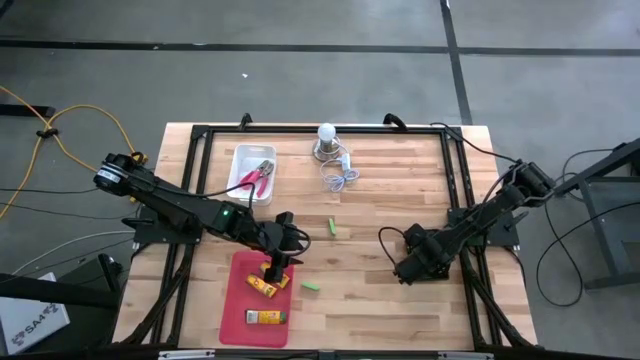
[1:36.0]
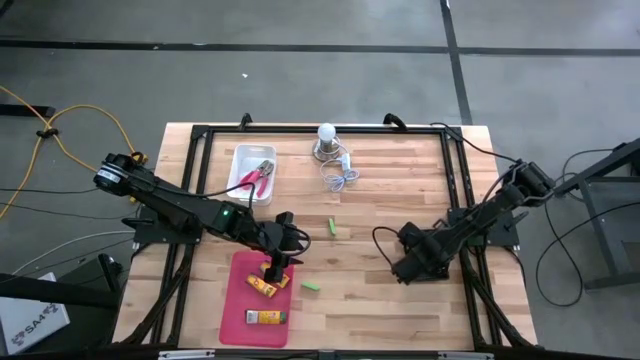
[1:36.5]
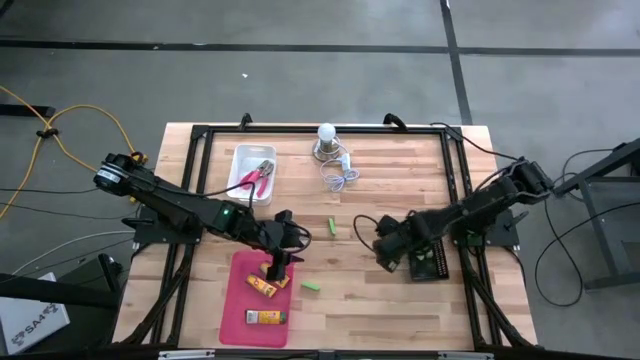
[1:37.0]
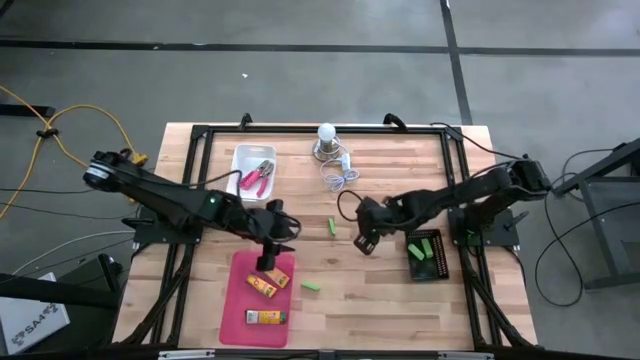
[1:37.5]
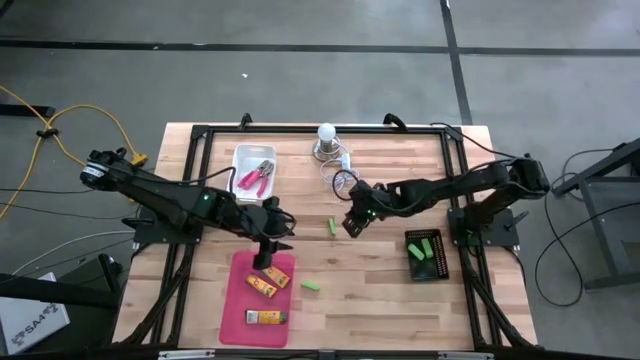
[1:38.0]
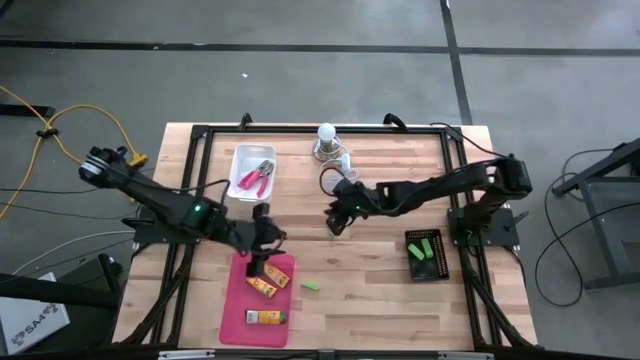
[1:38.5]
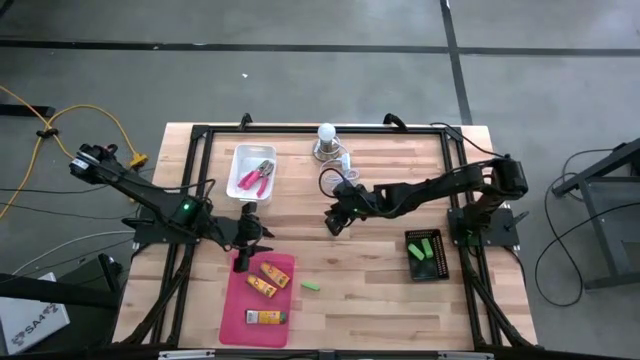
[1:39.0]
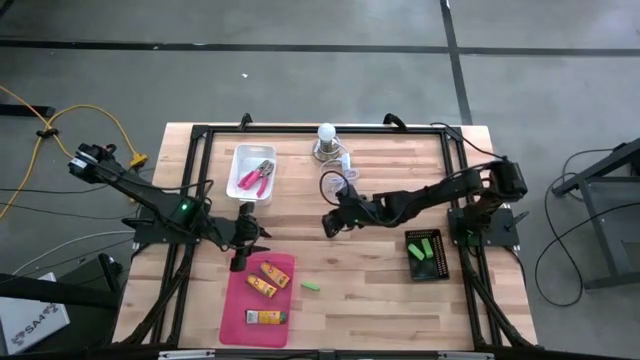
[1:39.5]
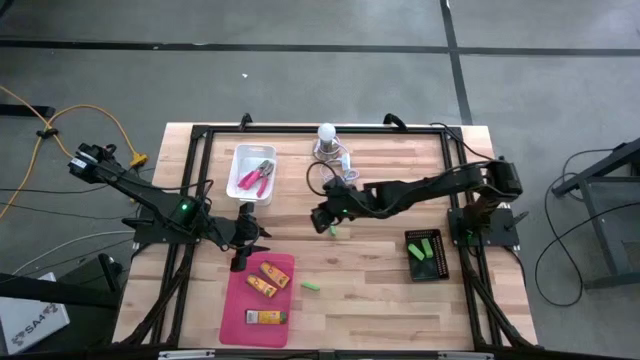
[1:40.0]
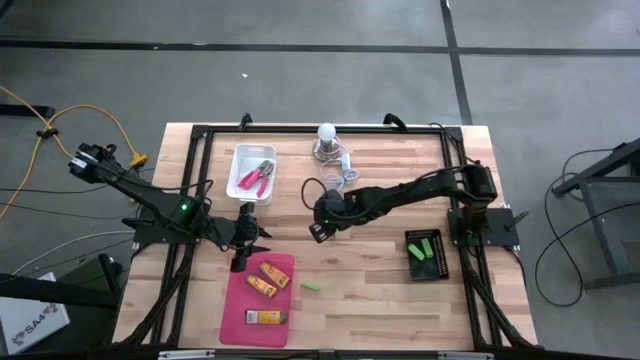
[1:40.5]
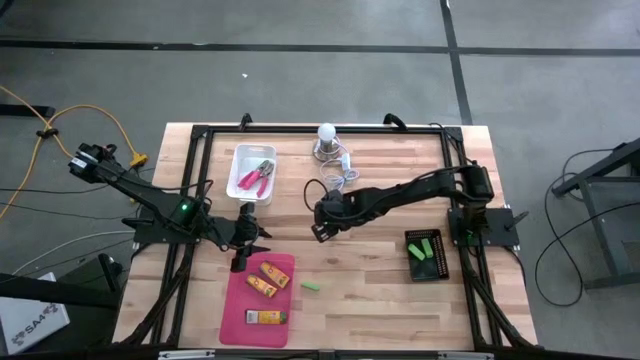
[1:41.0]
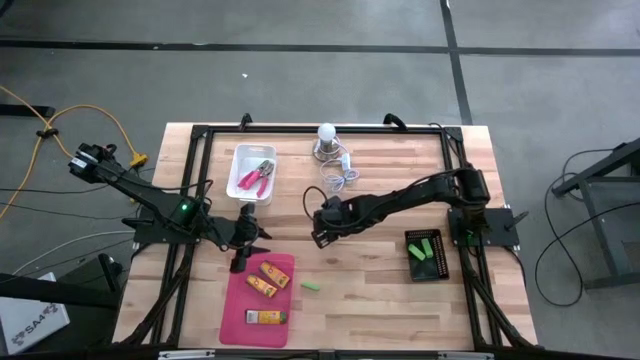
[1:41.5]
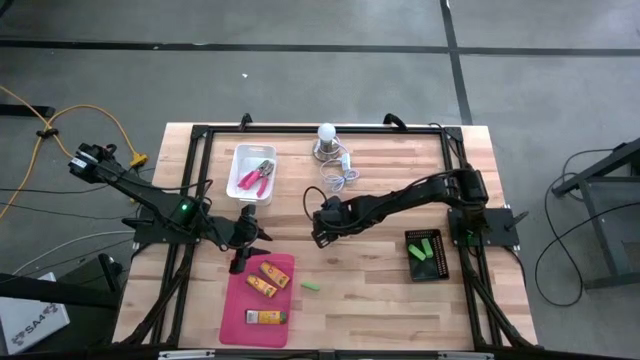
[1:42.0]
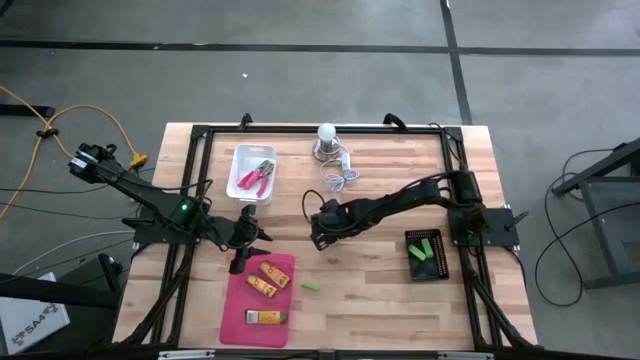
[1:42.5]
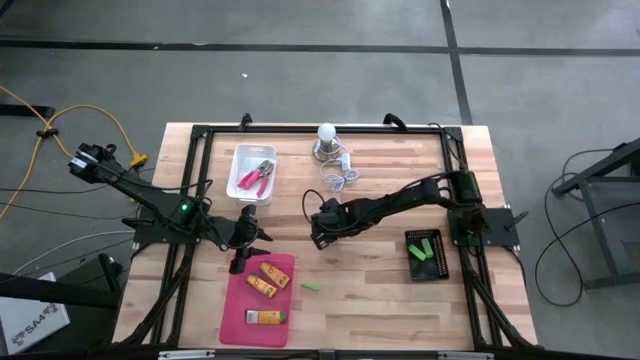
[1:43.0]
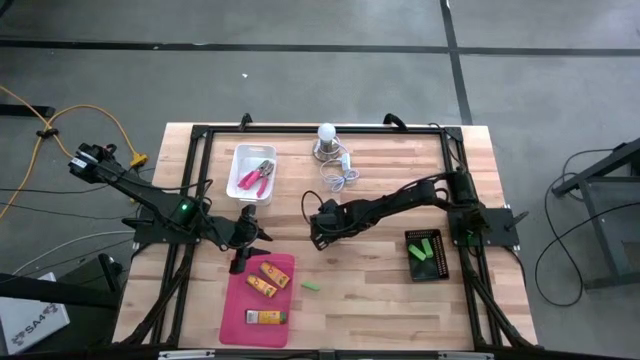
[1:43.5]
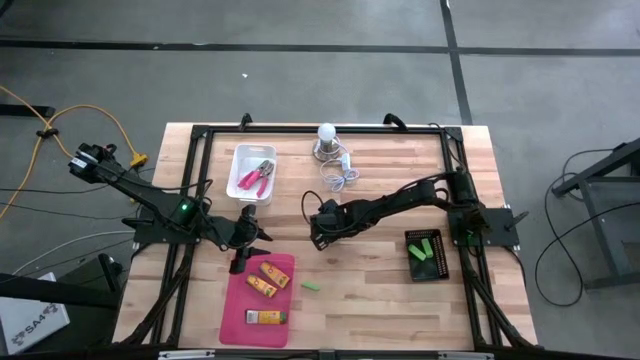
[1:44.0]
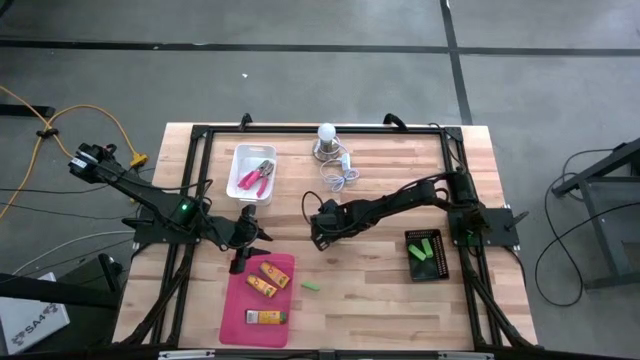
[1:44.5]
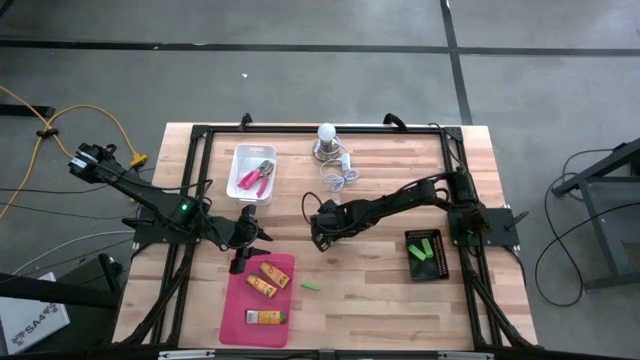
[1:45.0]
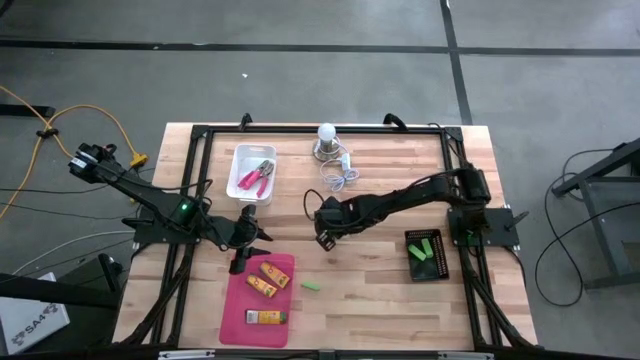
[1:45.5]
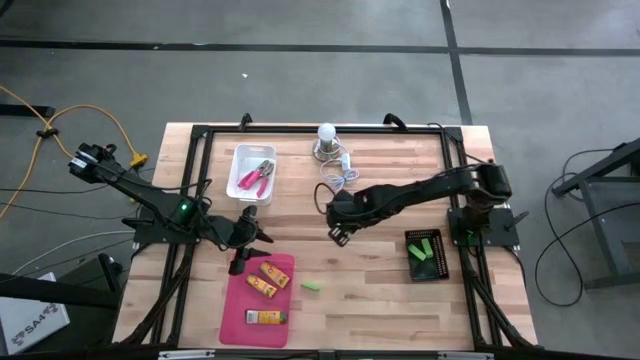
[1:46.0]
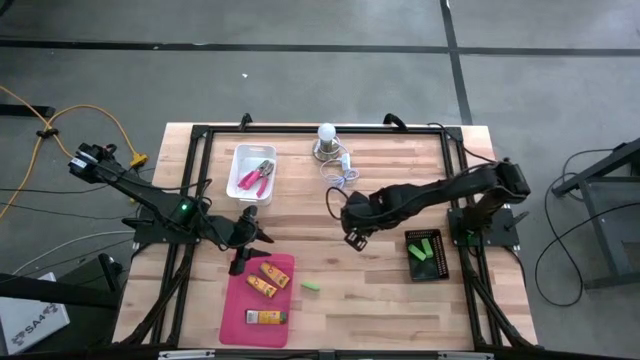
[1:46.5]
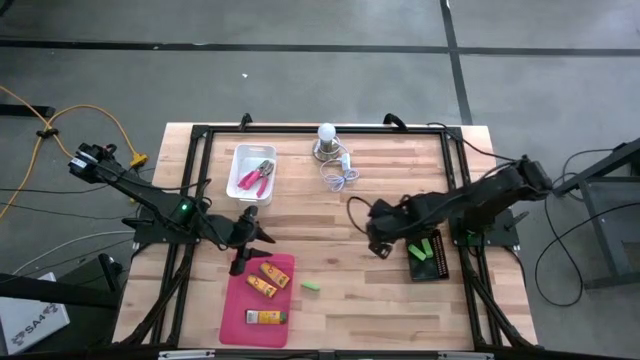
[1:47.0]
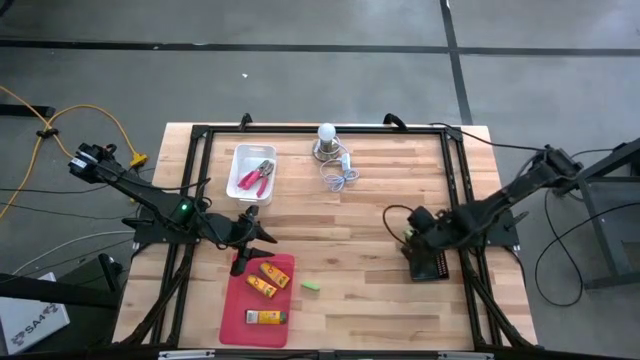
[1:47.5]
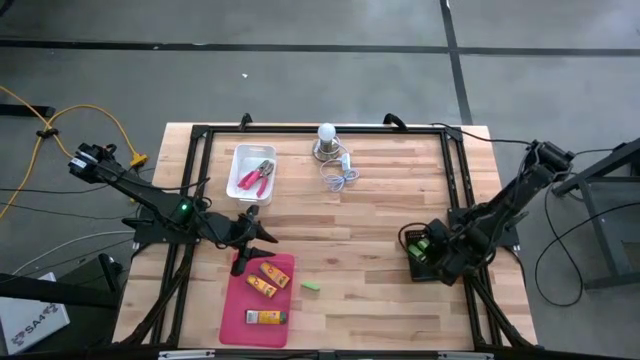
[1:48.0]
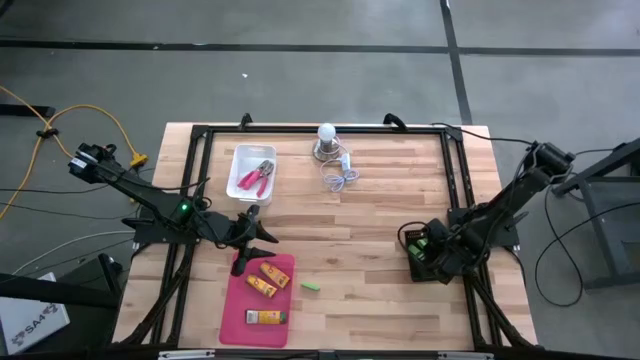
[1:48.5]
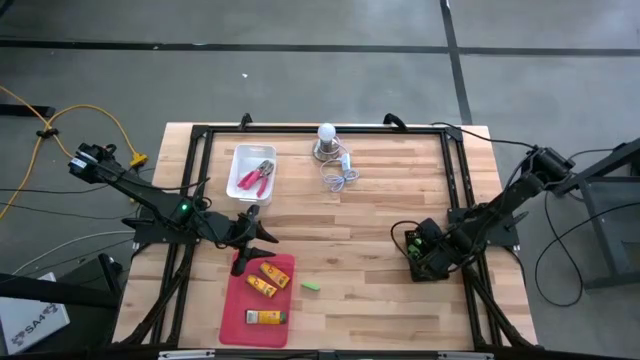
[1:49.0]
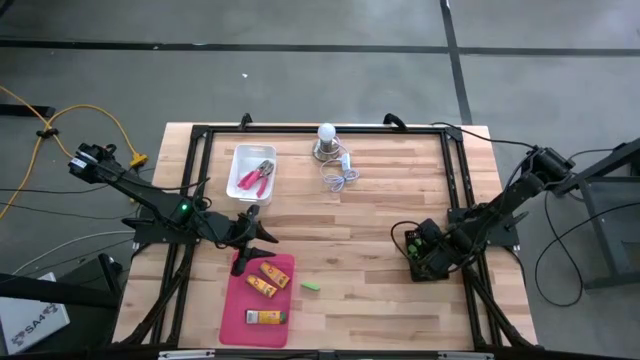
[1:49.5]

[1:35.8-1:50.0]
Task: Pick & Place School Supplies
Put the green eraser into the black bin

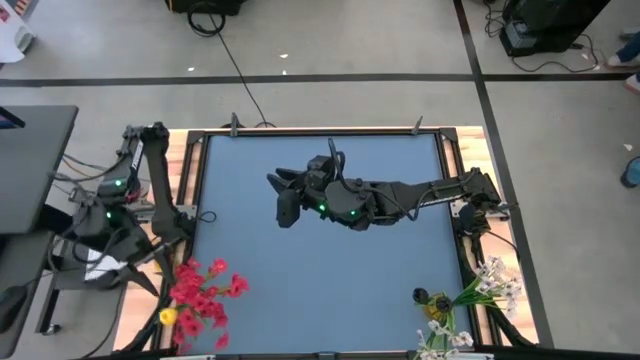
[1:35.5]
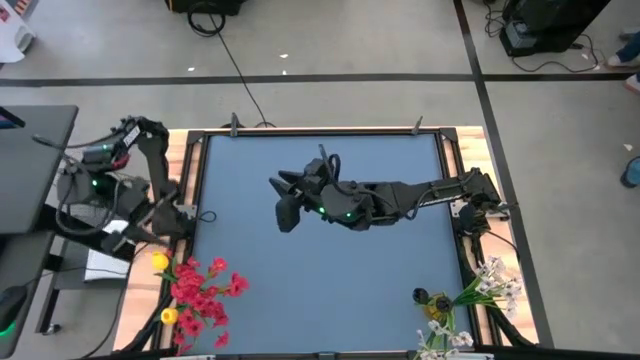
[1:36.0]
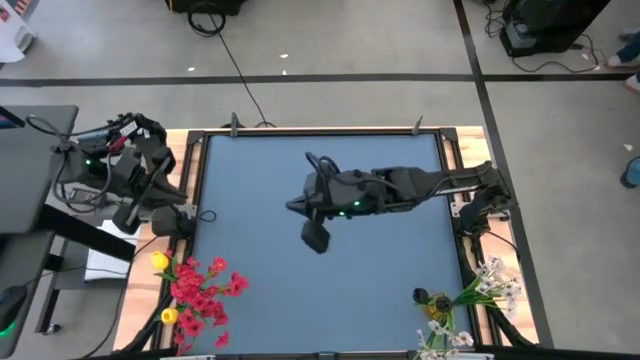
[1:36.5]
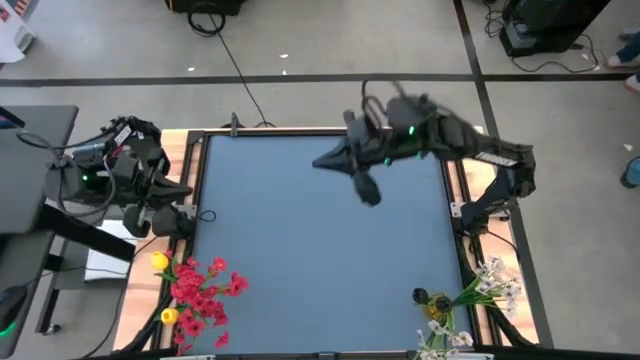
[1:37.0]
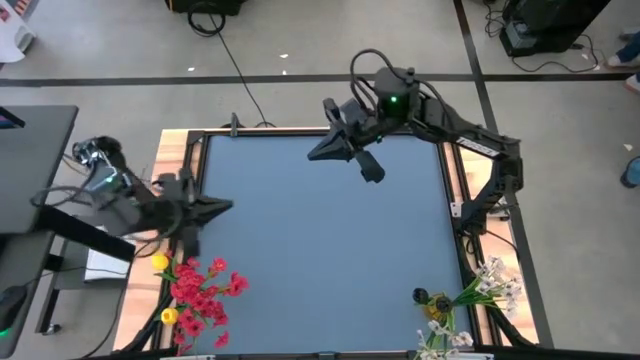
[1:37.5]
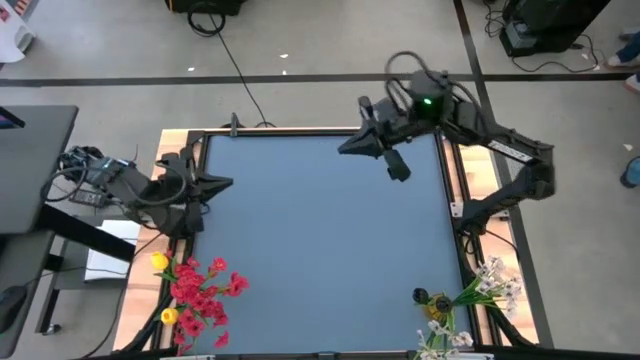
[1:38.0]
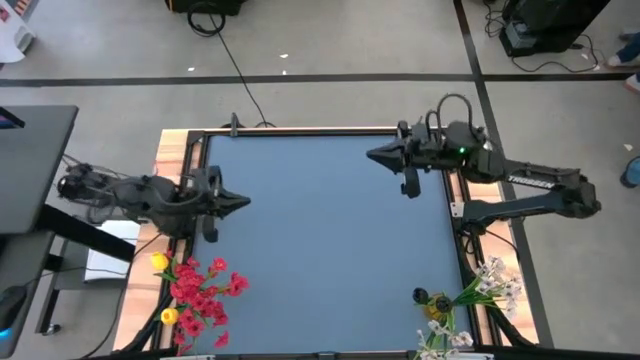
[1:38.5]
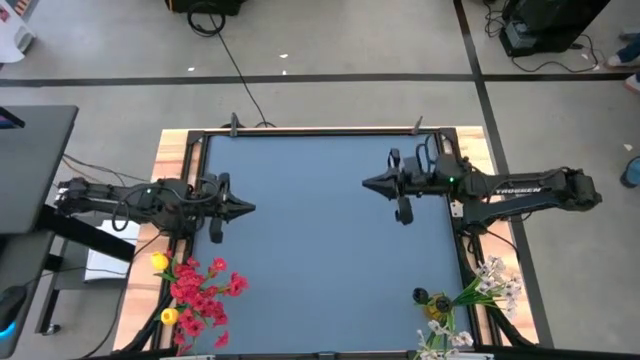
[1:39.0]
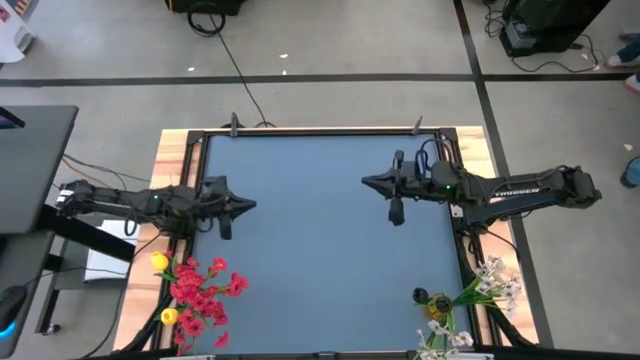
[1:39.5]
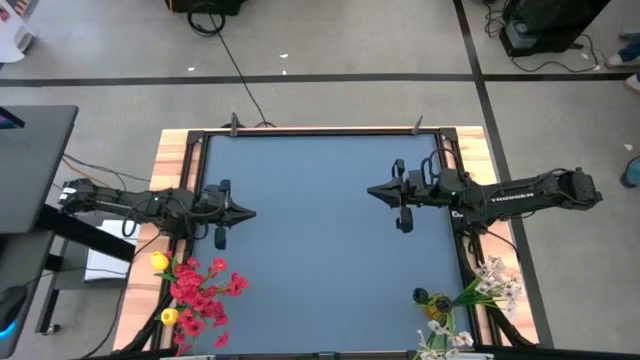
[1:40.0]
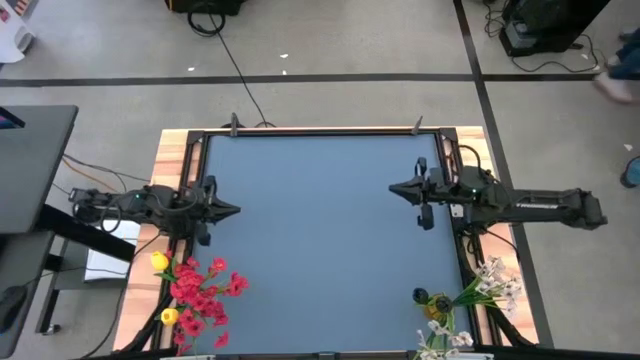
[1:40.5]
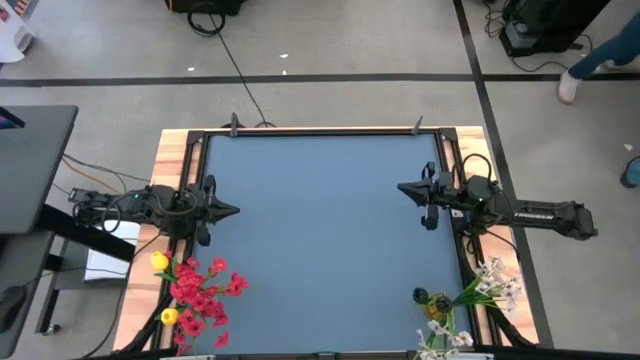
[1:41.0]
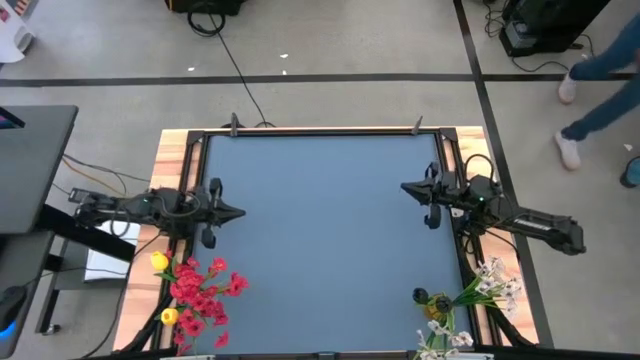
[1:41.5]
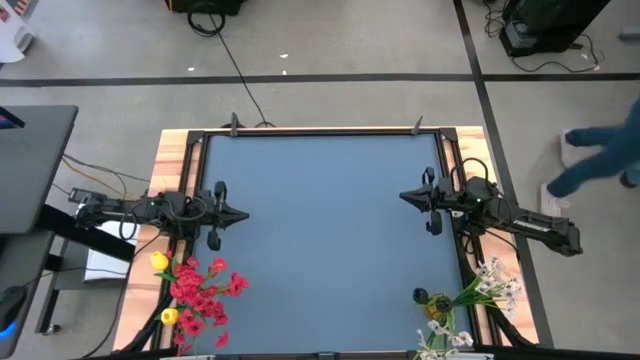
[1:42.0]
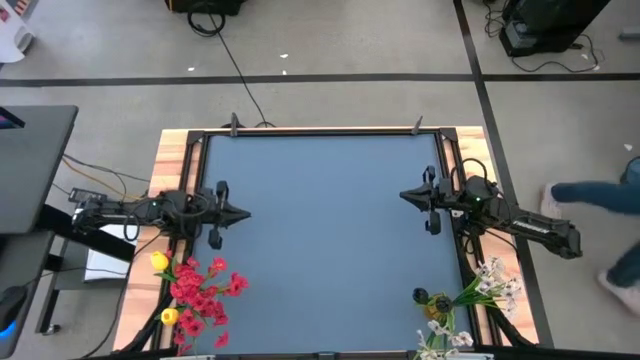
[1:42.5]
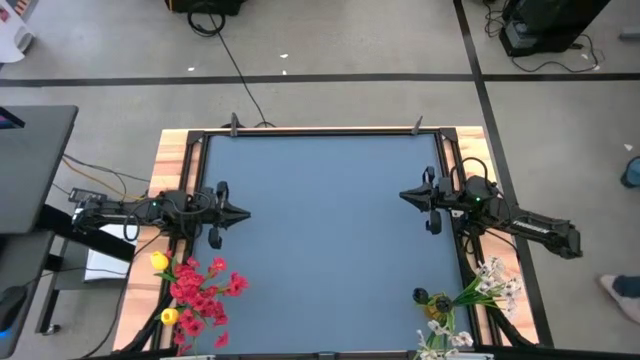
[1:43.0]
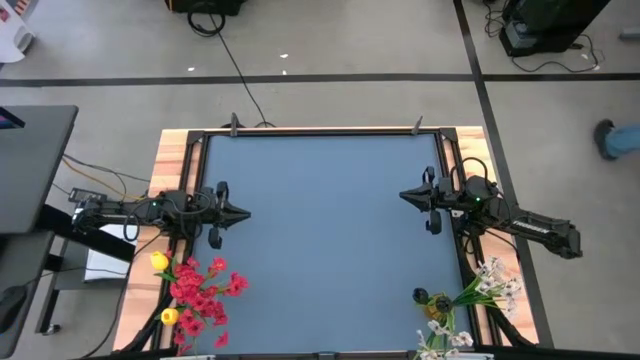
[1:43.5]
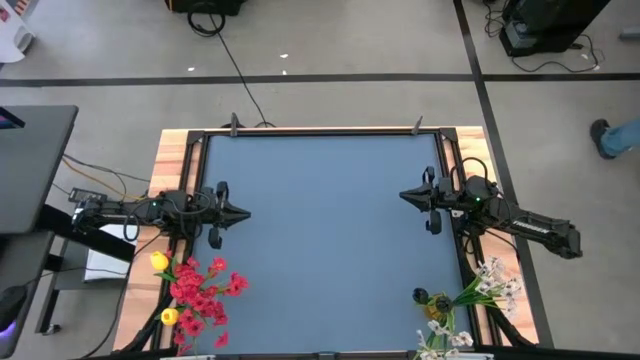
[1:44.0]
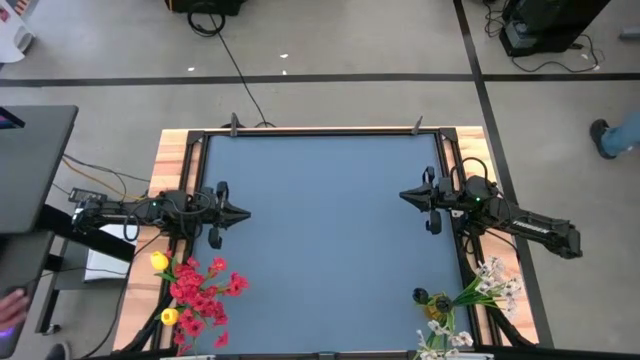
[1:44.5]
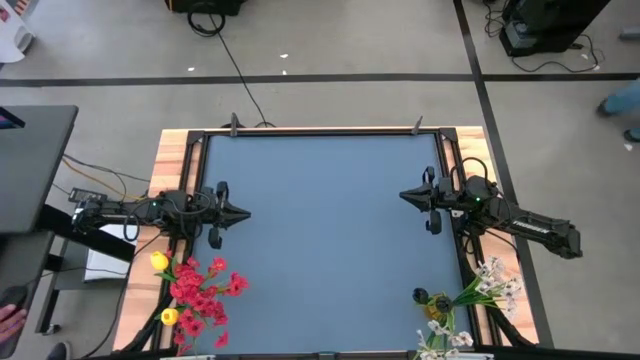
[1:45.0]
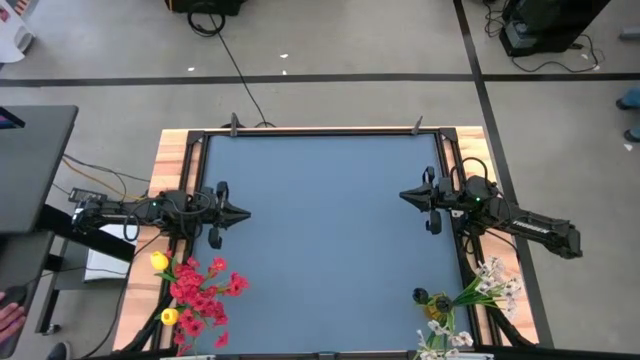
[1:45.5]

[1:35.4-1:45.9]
Task: Sort flowers into vase by color
Return to Home Position
